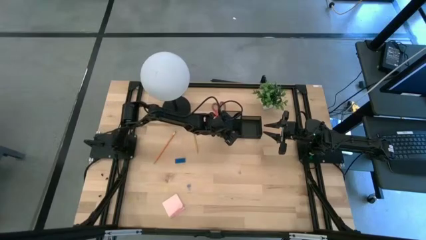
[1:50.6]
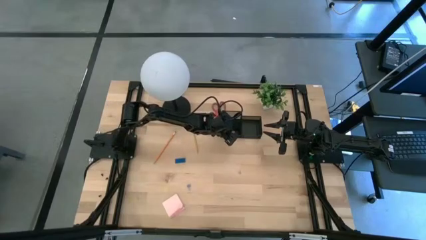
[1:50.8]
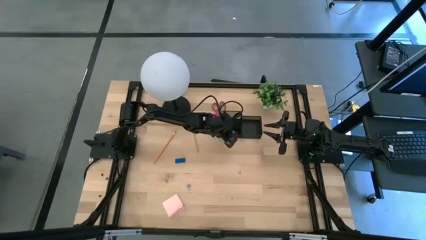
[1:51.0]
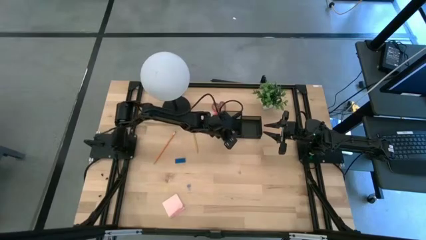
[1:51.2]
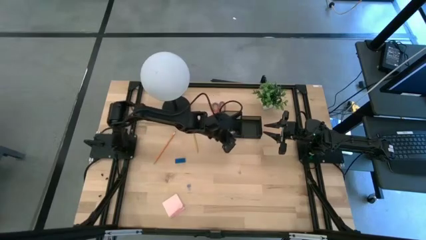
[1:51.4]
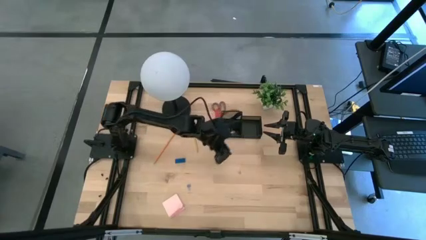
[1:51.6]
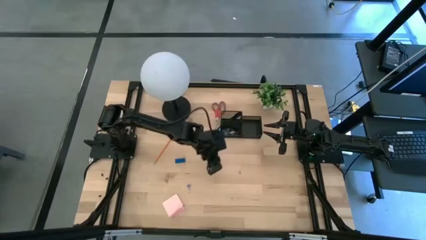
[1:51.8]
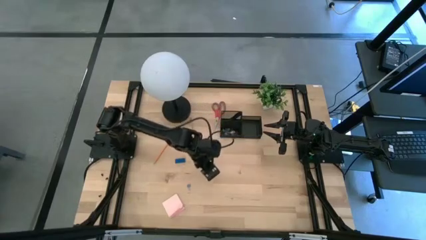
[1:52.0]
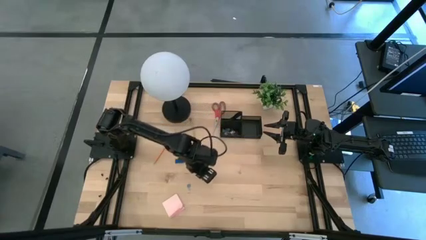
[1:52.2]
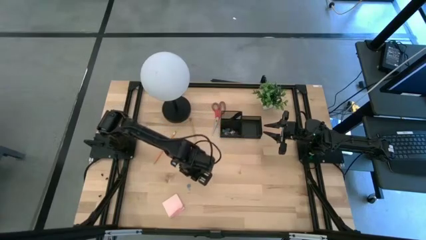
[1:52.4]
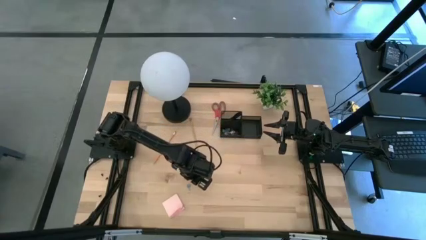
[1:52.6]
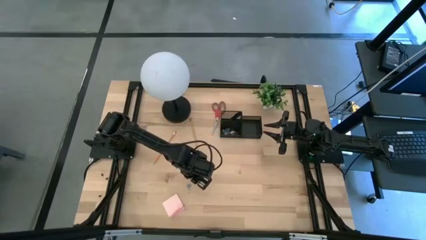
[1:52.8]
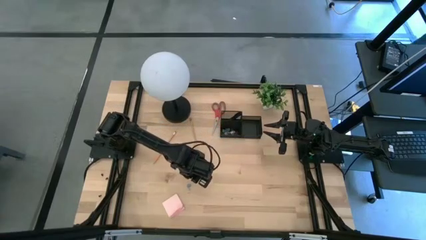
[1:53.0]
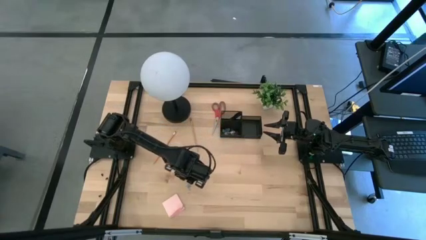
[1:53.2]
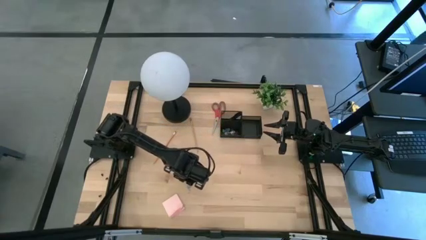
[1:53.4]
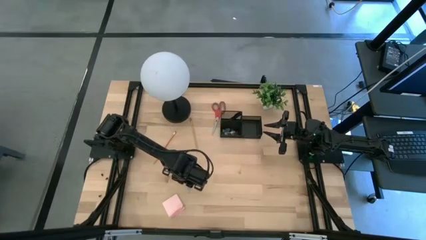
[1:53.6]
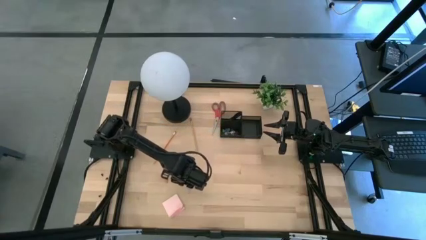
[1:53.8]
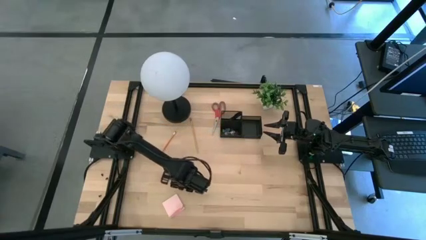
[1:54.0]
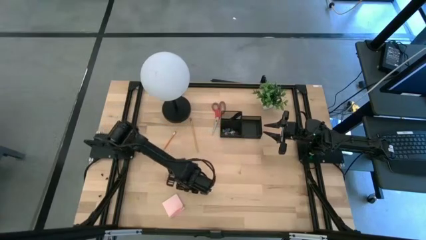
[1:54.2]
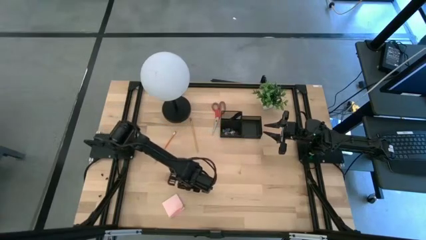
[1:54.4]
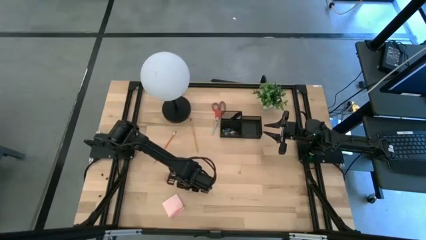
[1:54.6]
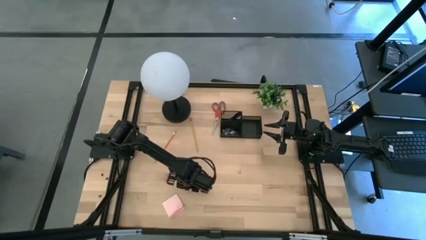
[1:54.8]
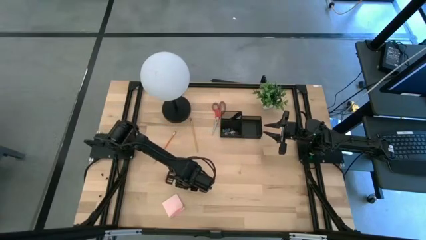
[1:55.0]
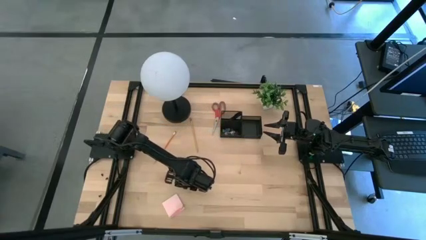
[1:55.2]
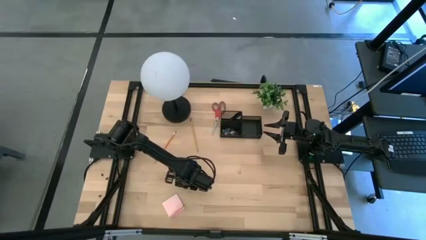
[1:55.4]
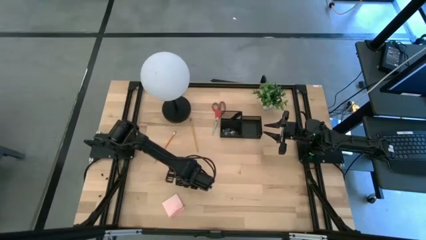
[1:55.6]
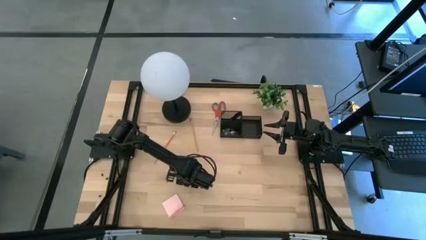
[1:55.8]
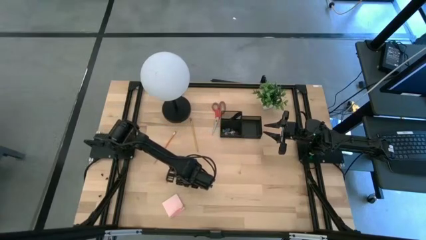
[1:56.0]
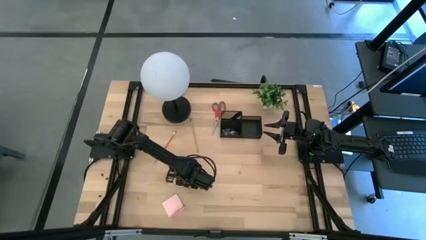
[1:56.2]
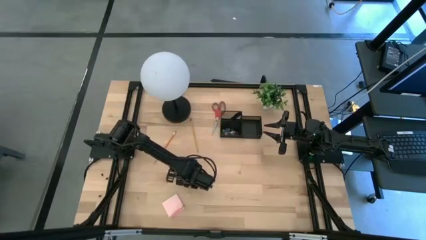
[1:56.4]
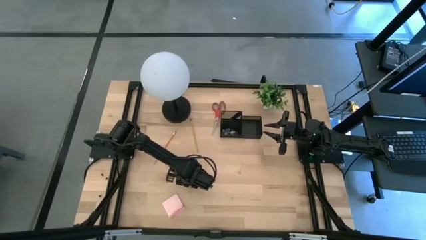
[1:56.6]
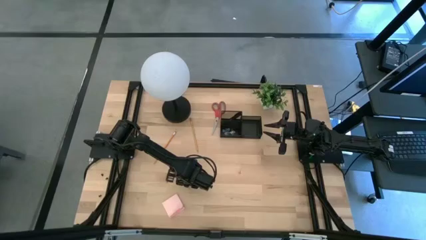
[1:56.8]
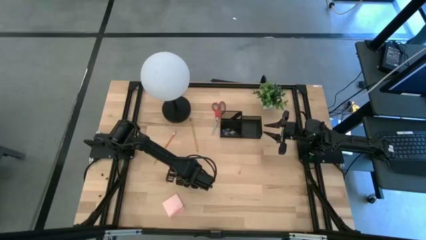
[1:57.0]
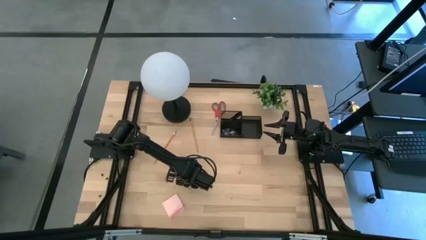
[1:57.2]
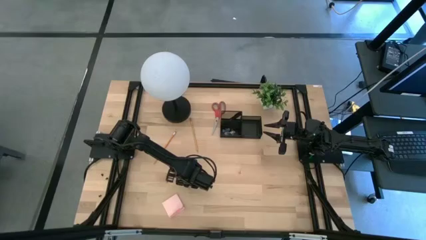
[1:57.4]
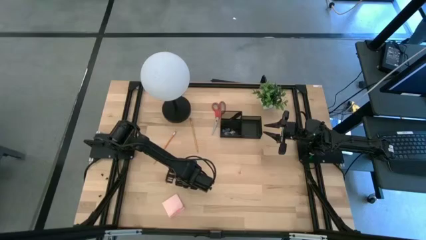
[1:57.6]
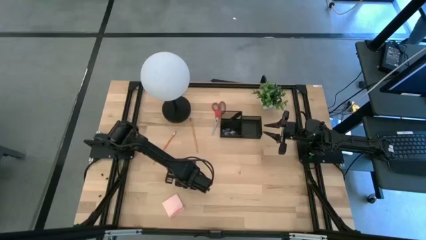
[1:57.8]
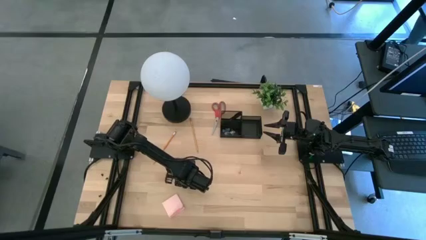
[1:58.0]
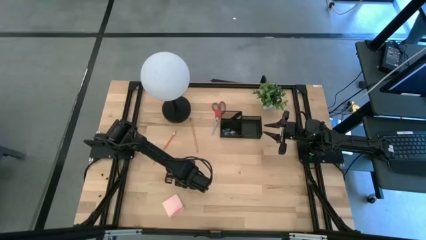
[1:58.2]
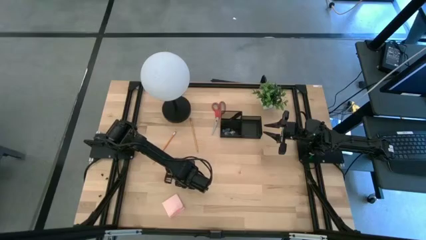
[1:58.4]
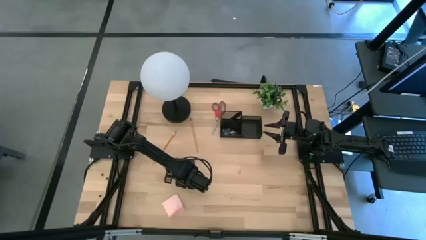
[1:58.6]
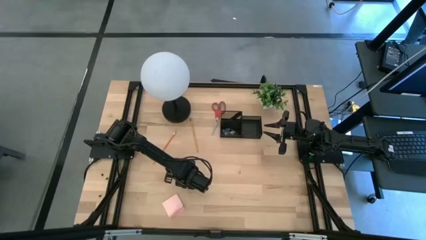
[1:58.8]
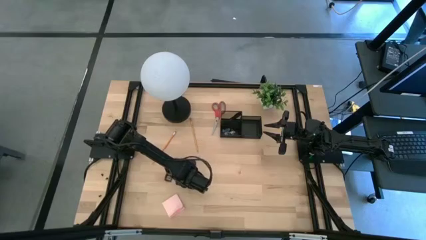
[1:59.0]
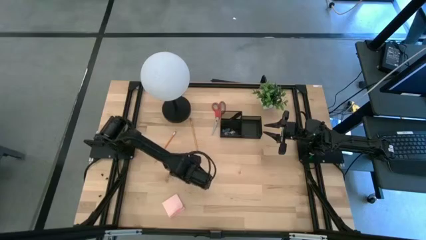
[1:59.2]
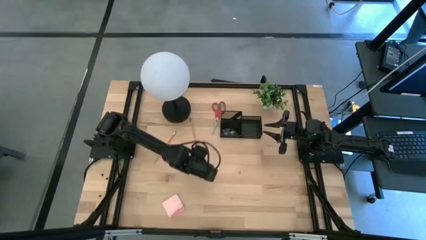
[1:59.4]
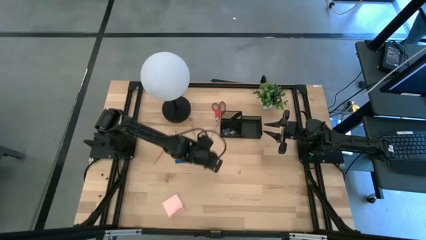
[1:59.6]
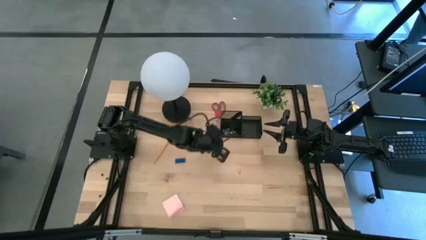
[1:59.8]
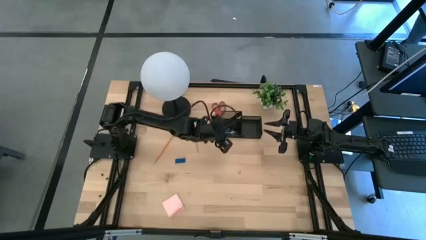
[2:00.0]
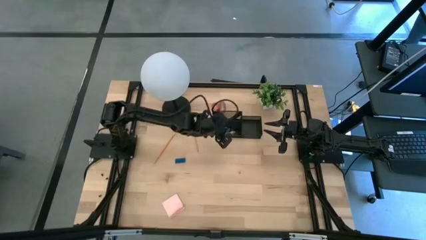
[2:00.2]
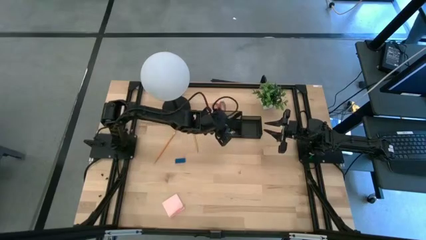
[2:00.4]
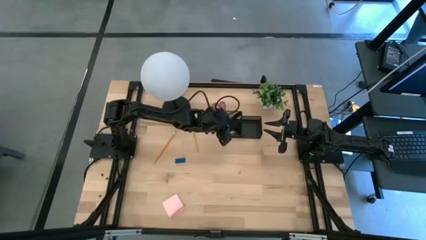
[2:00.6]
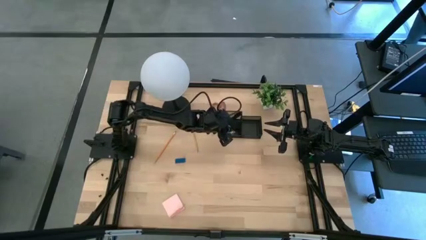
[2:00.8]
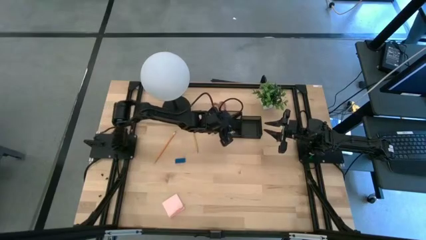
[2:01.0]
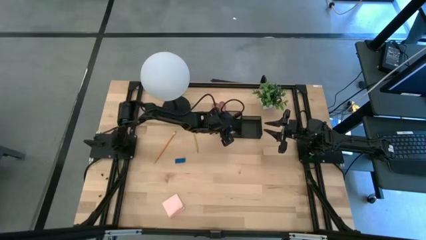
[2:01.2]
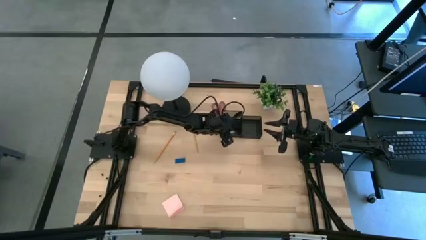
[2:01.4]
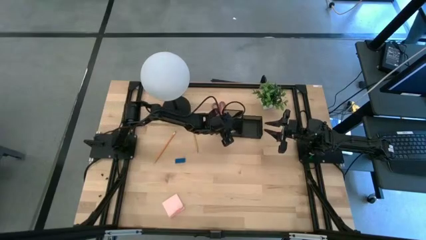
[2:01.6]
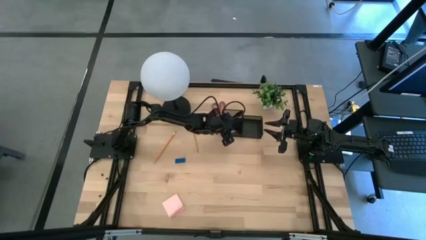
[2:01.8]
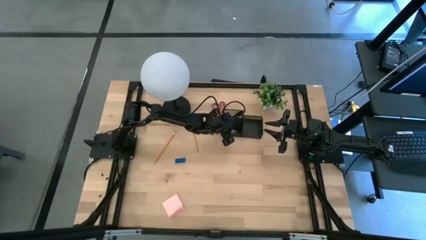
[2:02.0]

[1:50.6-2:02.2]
Task: Pick and place office supplies into organizer
Put the blue clip binder into the black desk organizer
